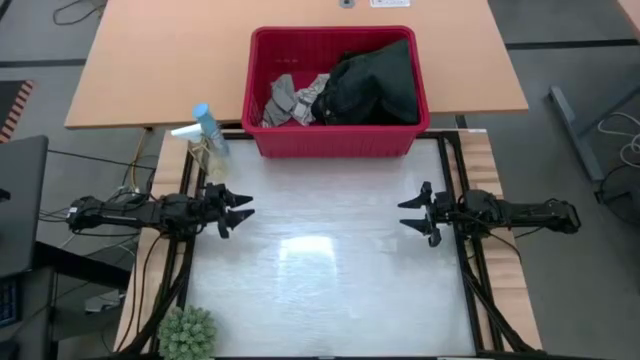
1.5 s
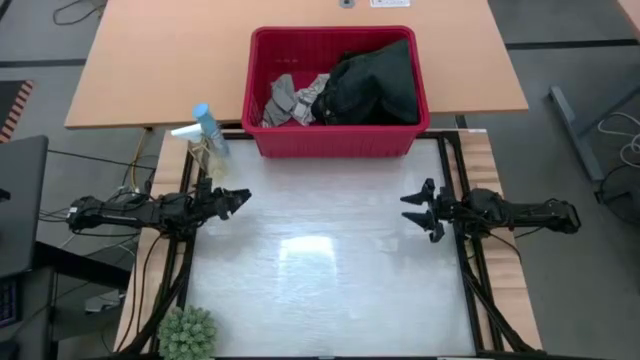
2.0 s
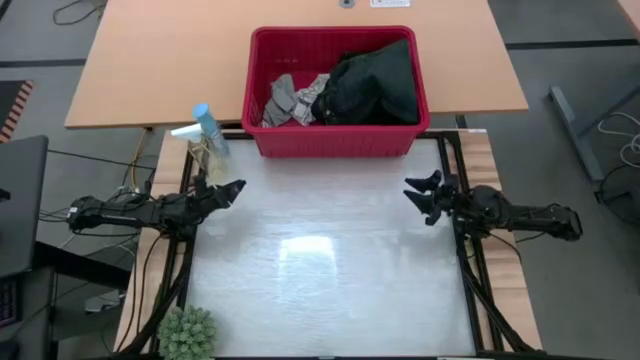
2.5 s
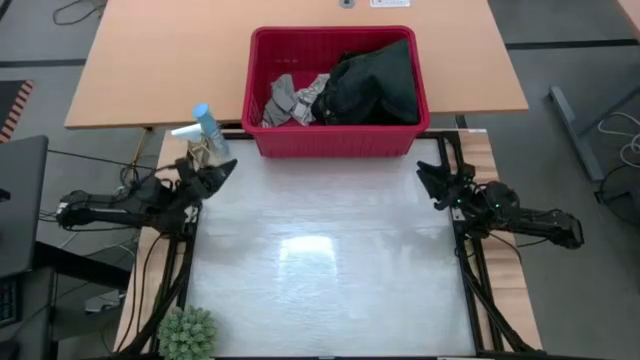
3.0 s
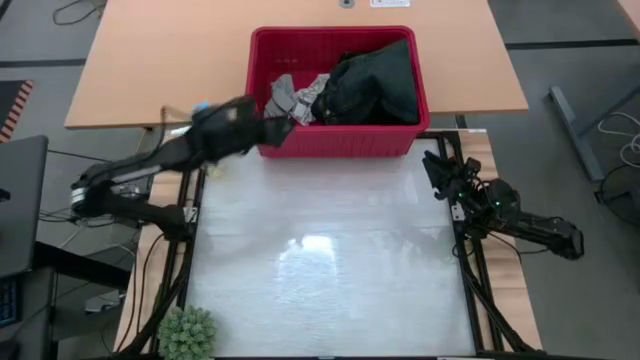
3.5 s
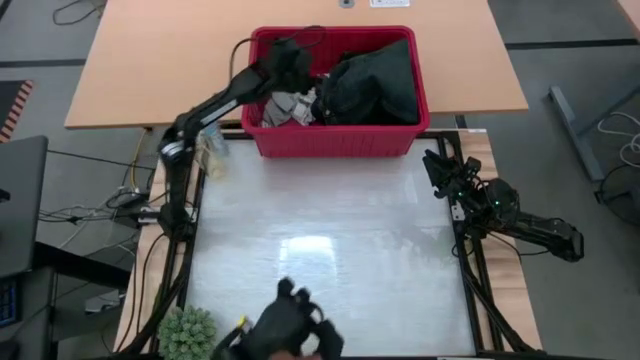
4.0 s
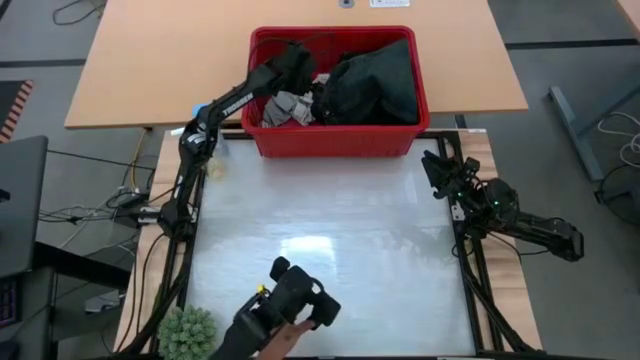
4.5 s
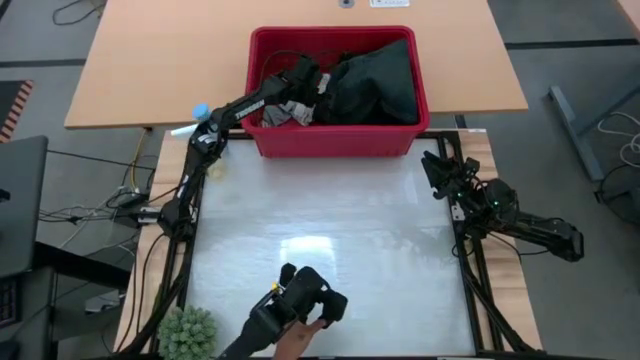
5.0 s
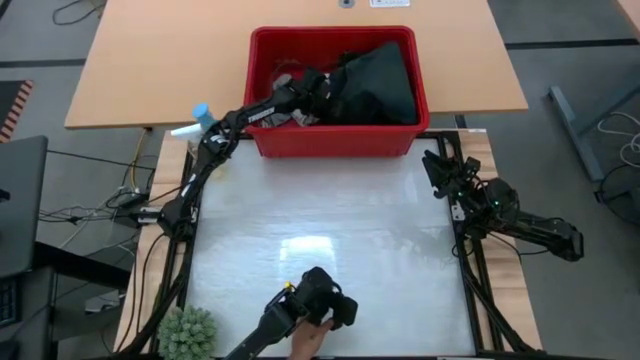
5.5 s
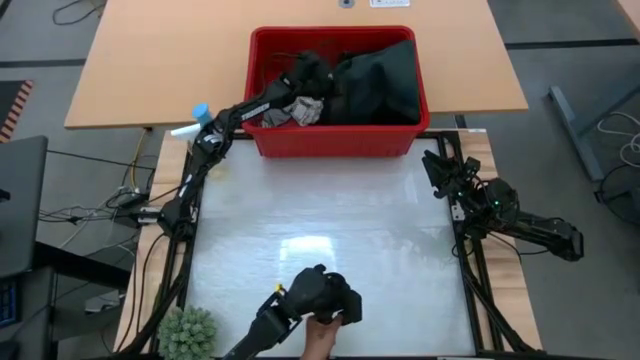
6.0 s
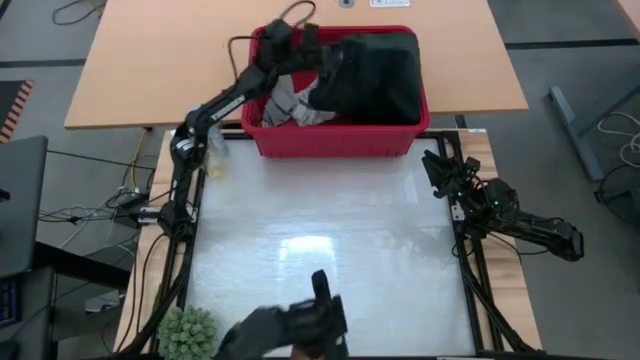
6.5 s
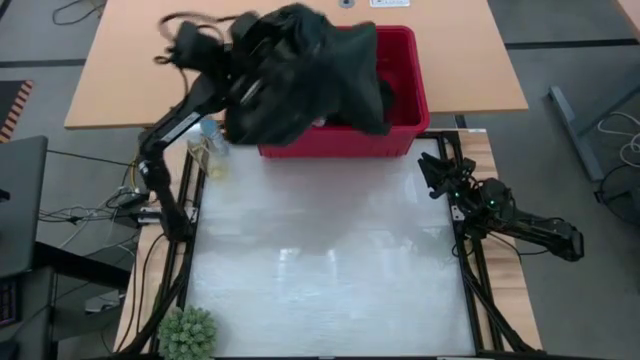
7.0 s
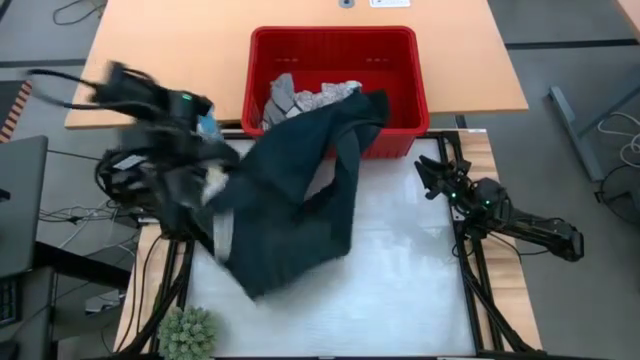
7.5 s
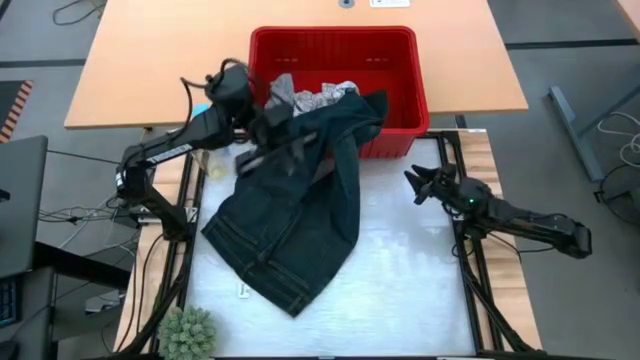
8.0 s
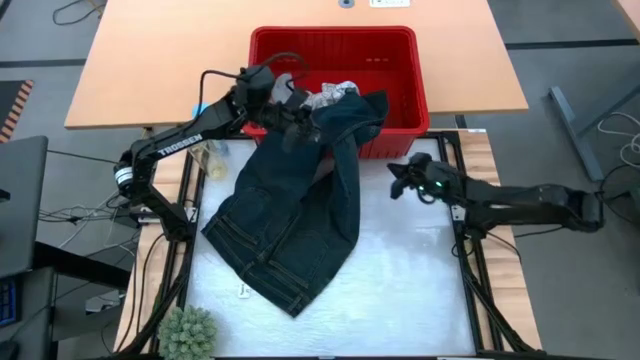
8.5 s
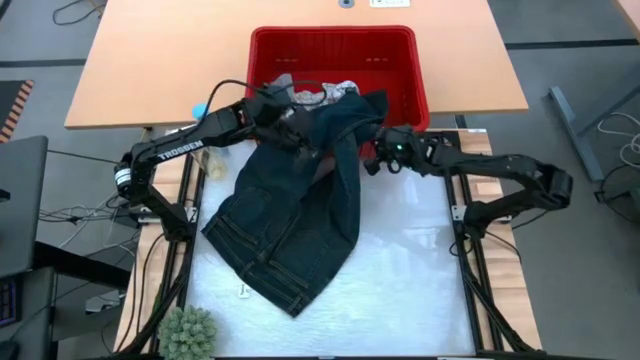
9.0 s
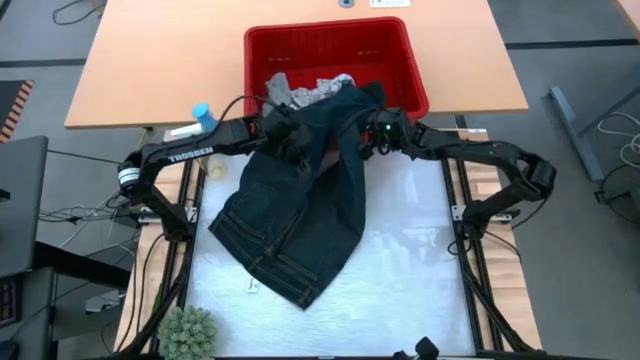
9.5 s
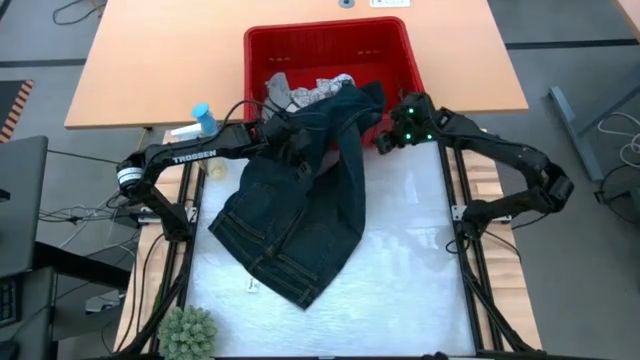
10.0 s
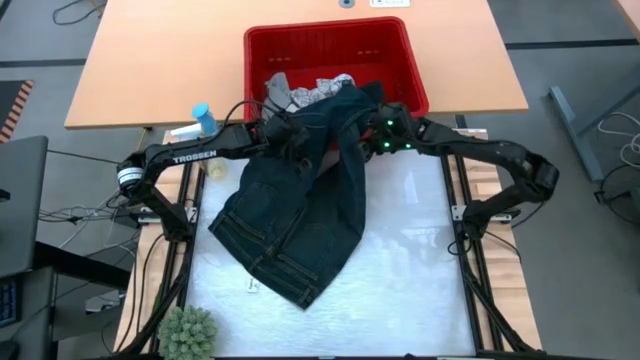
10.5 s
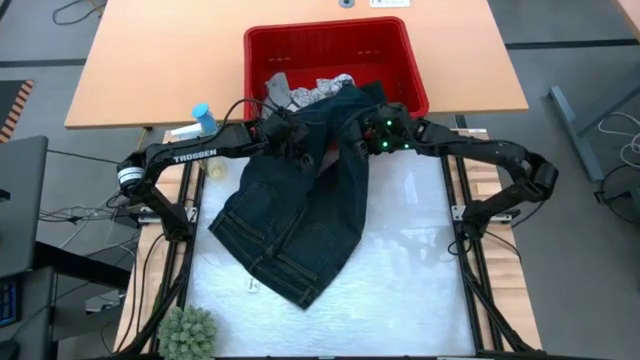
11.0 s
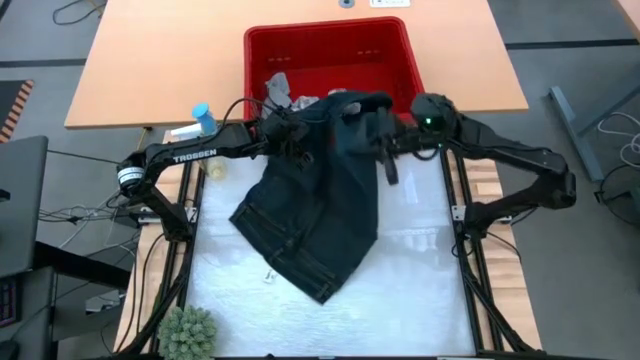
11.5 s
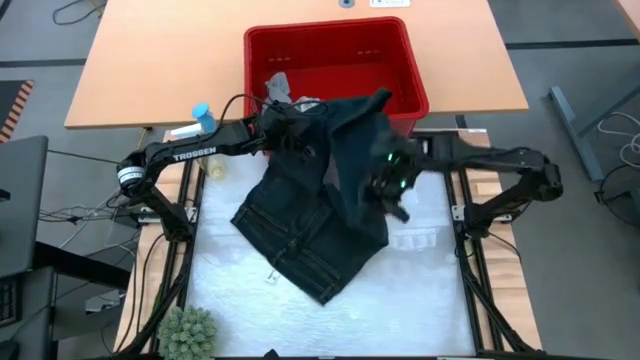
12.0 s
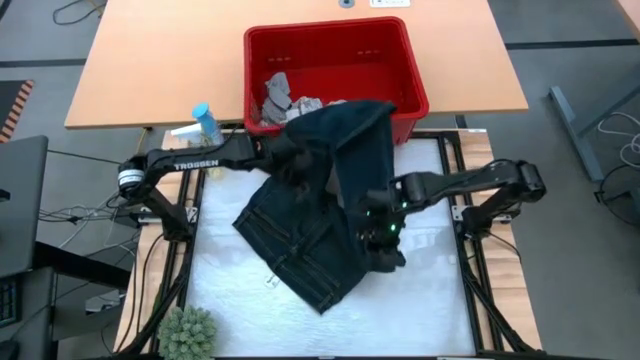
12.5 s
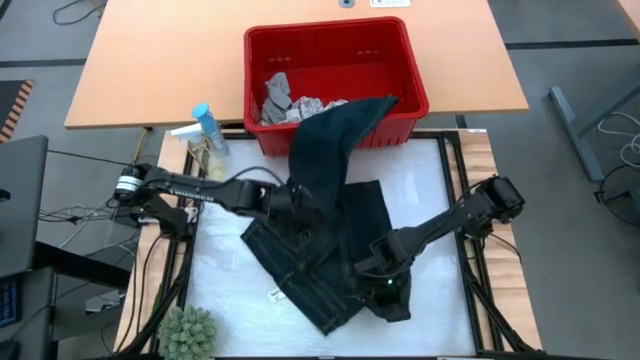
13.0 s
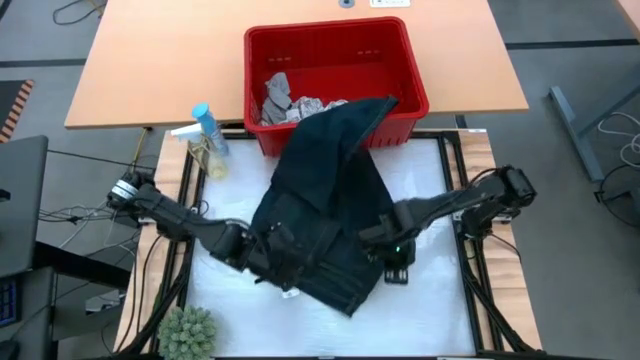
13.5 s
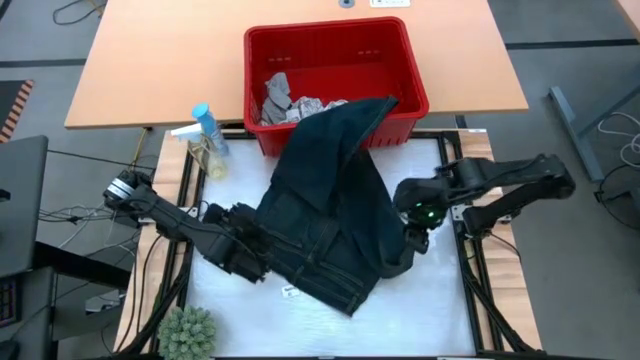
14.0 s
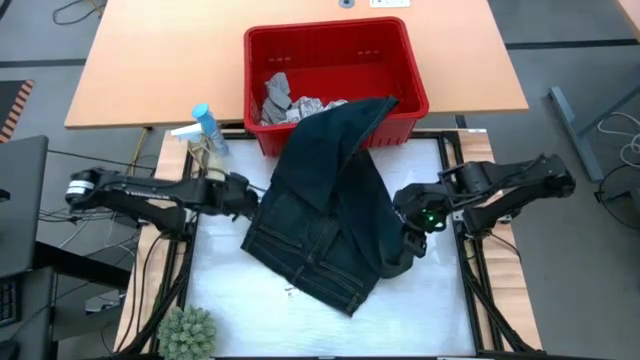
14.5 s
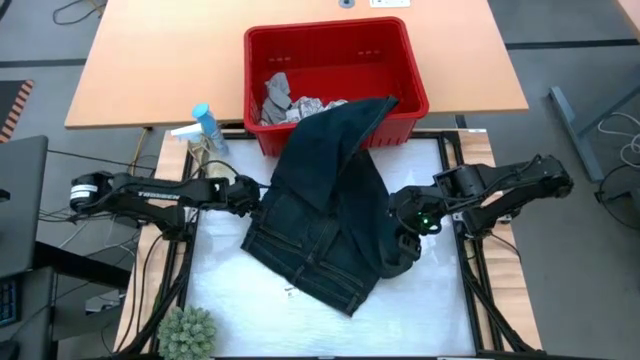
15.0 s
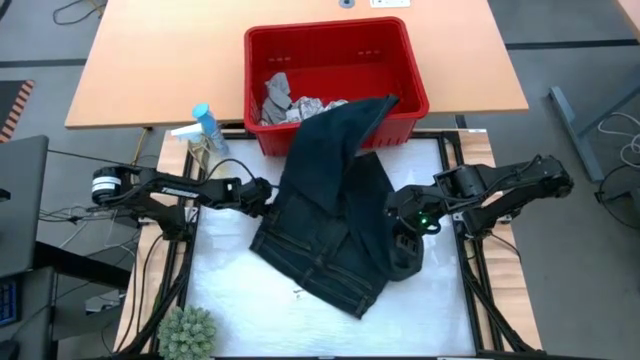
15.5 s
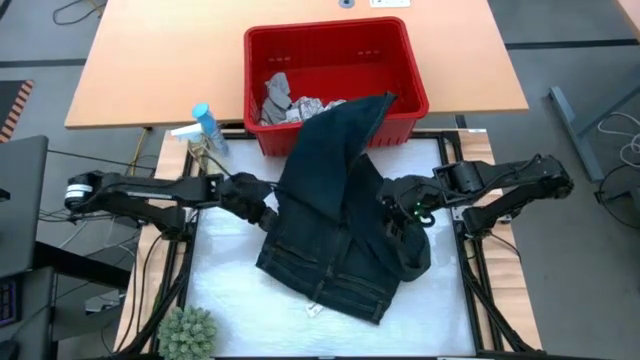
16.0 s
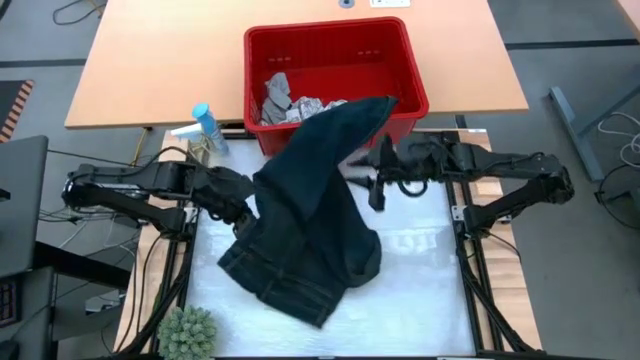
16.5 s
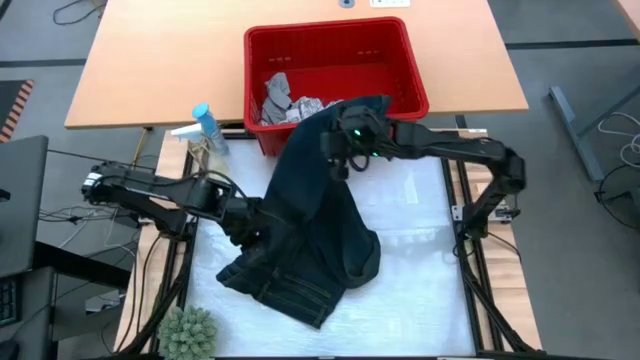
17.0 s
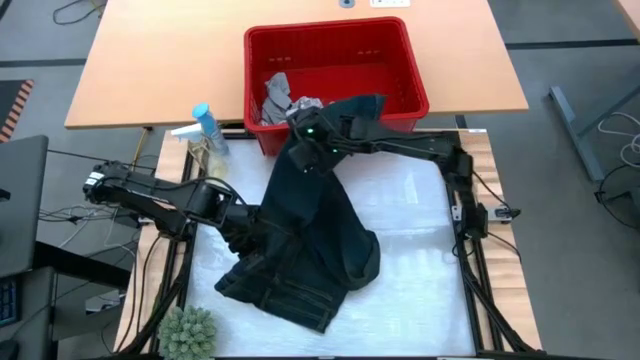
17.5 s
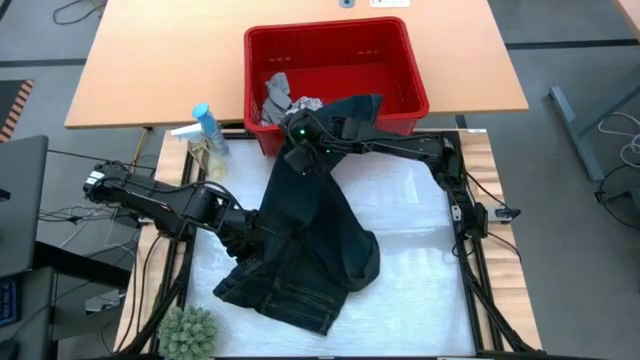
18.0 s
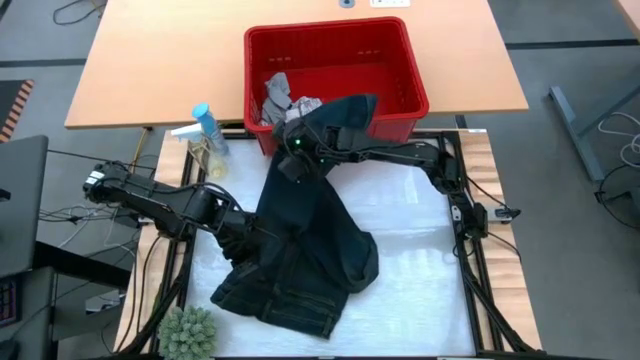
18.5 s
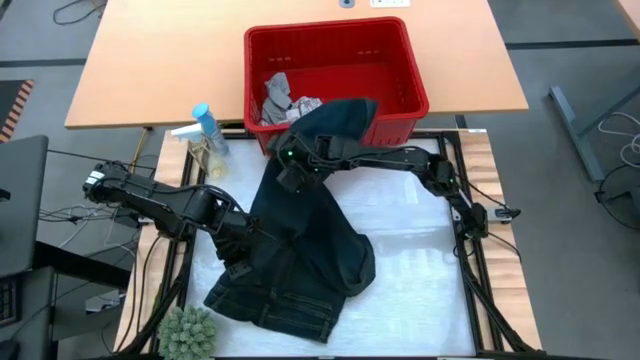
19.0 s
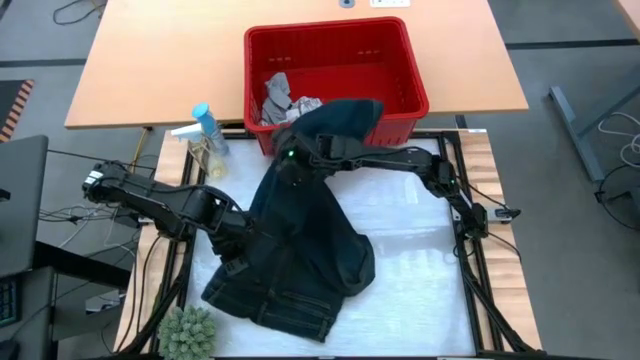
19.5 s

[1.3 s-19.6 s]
Task: Fold Laundry from Bin
Fold the blue jeans
